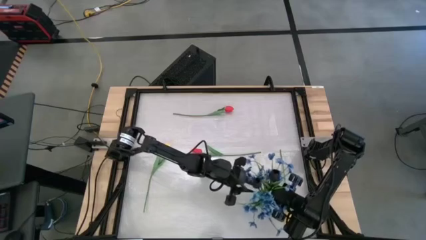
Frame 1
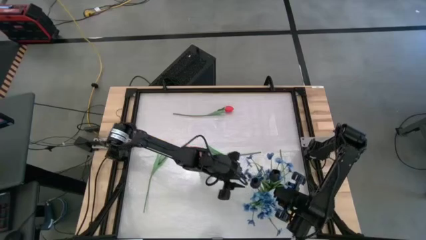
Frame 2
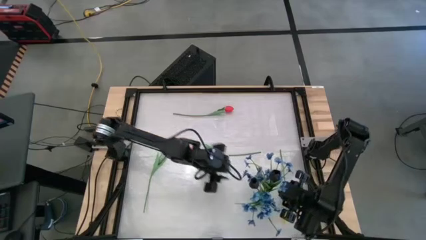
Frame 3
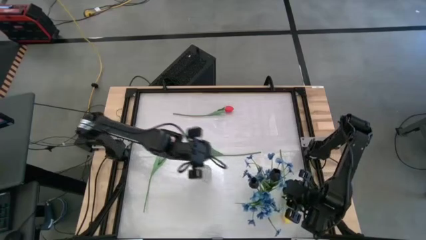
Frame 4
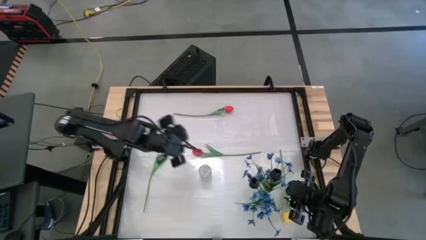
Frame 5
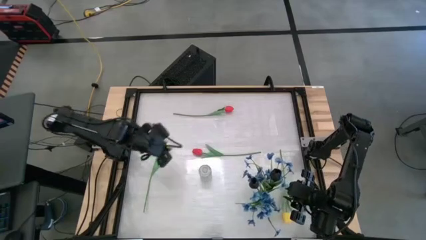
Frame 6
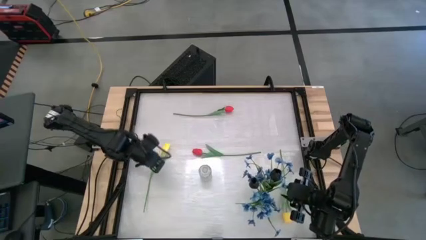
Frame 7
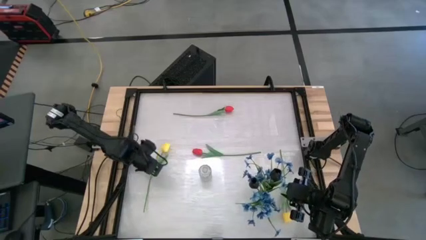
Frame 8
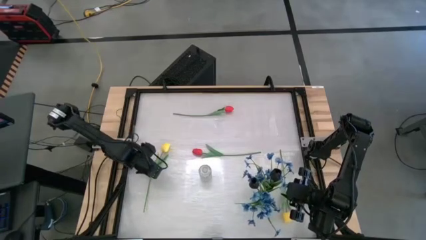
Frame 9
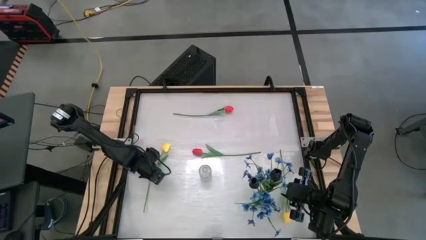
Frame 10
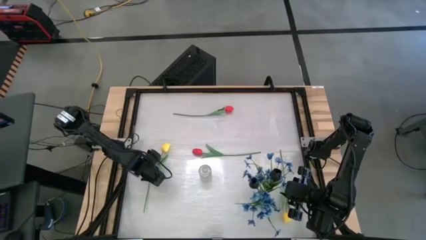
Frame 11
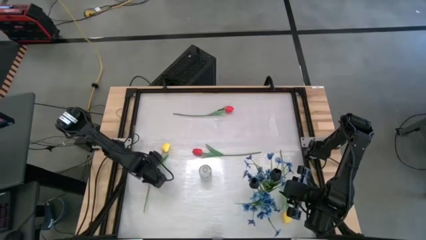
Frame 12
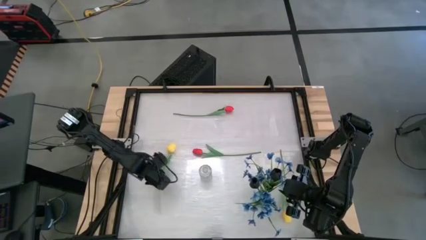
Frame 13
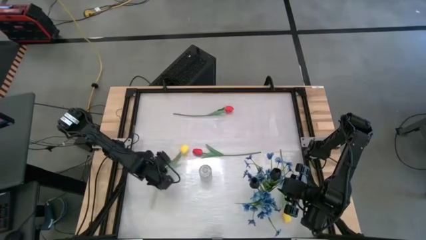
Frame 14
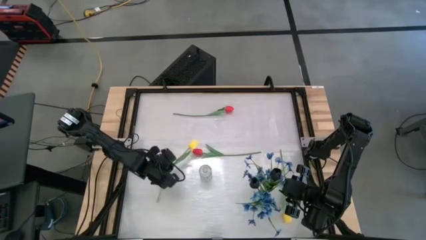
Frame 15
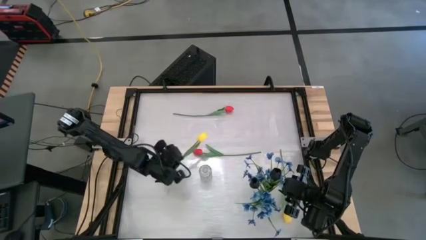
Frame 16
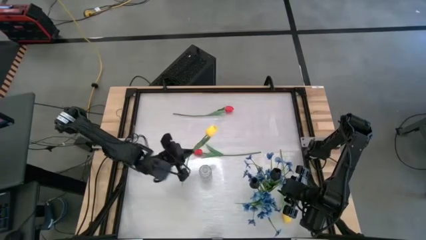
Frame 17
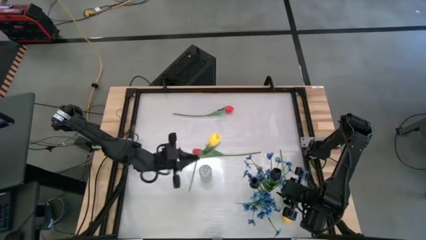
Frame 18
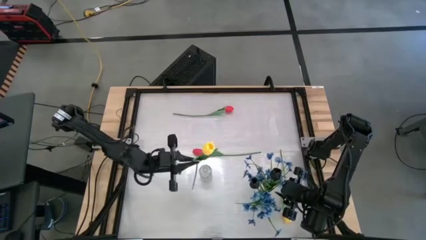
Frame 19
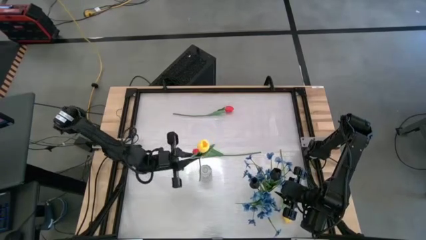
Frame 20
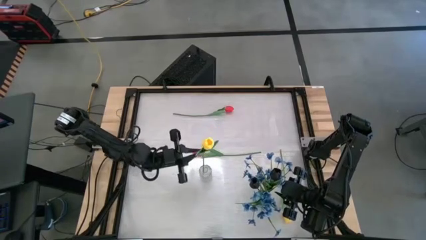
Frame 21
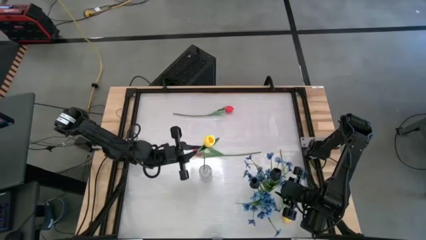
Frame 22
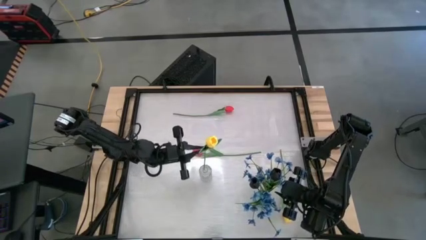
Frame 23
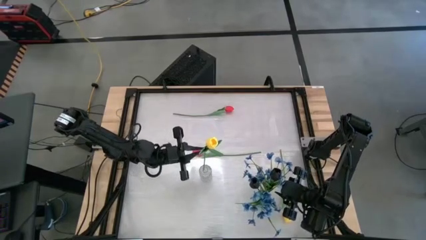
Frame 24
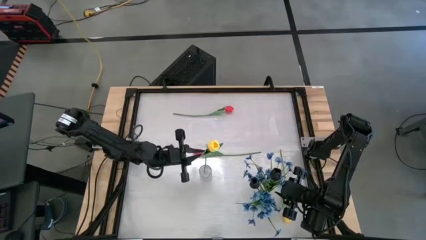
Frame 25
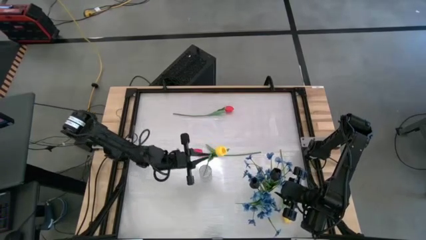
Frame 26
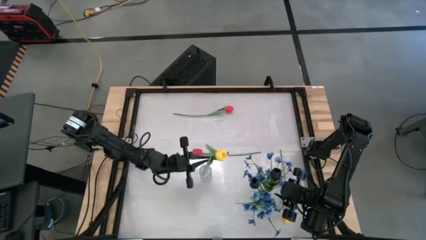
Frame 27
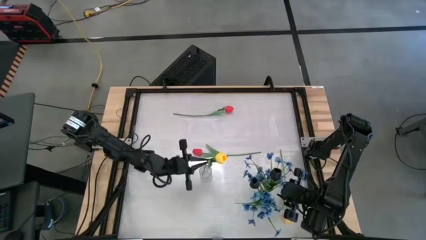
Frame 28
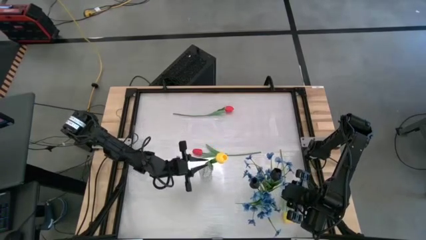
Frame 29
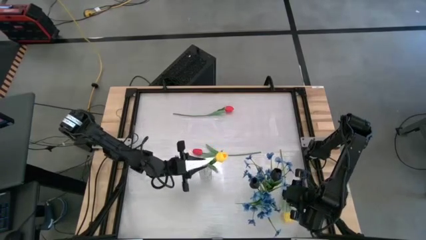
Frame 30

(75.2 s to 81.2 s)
Task: Sort flowers into vase by color
Put the left yellow flower into transparent vase

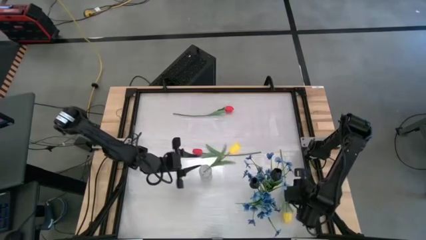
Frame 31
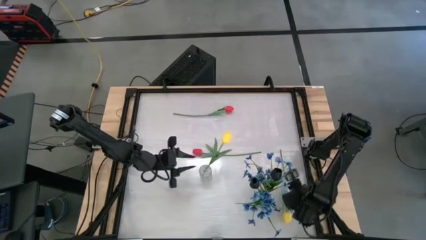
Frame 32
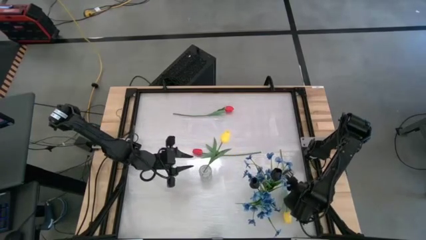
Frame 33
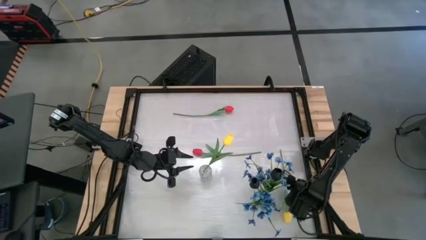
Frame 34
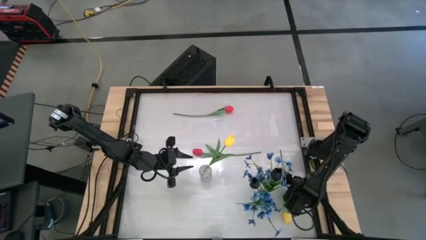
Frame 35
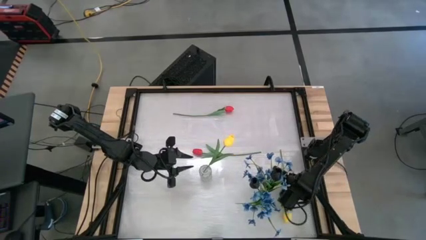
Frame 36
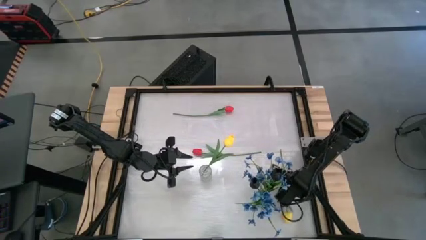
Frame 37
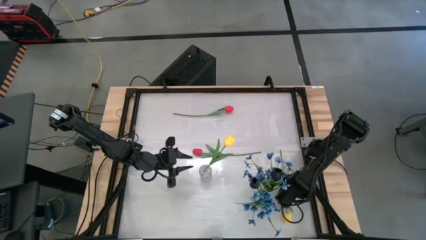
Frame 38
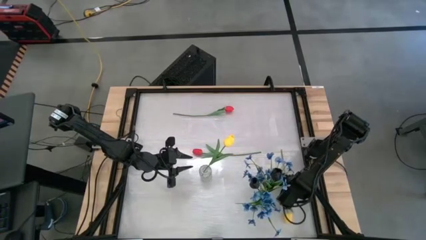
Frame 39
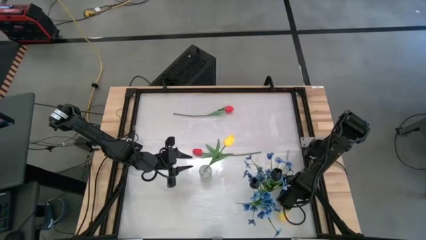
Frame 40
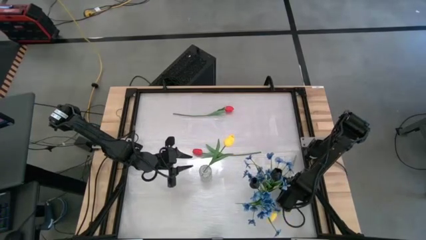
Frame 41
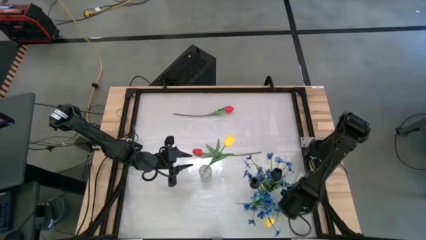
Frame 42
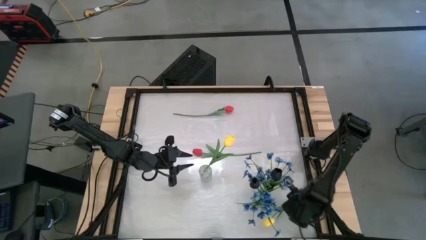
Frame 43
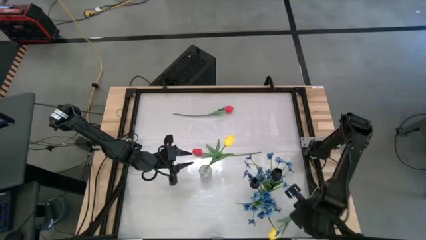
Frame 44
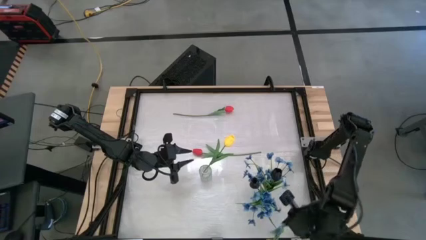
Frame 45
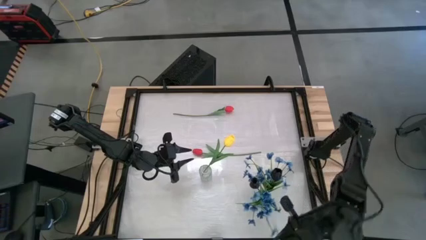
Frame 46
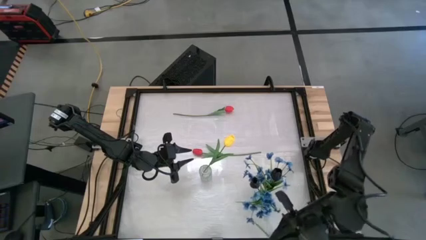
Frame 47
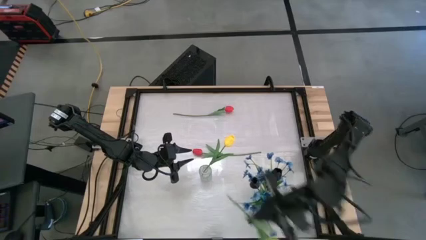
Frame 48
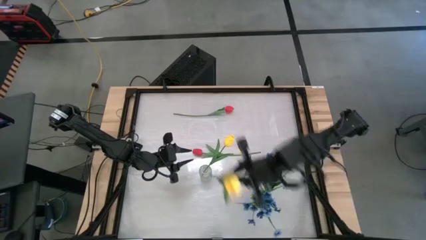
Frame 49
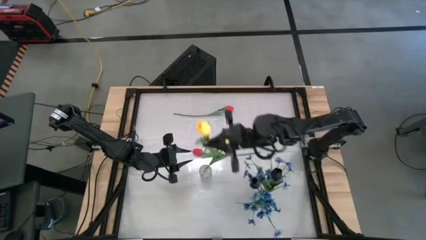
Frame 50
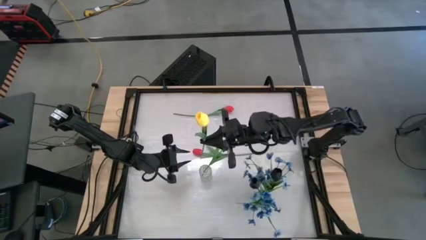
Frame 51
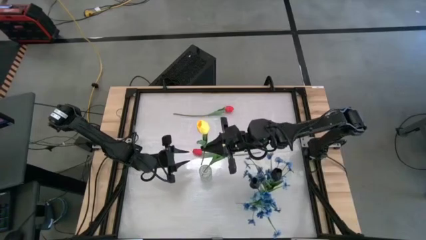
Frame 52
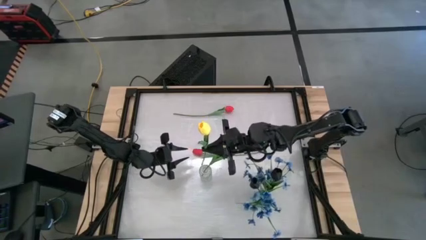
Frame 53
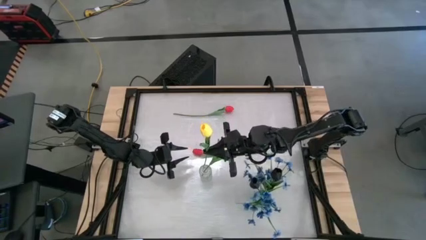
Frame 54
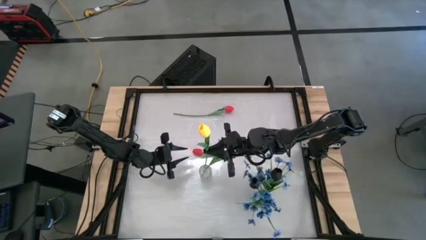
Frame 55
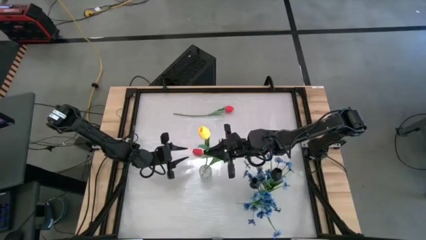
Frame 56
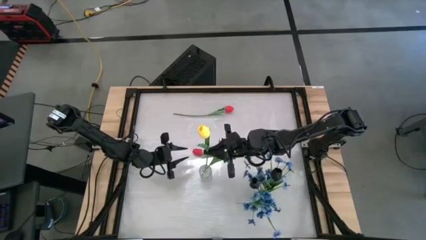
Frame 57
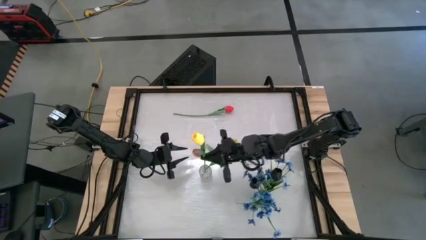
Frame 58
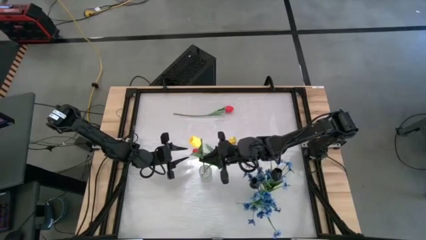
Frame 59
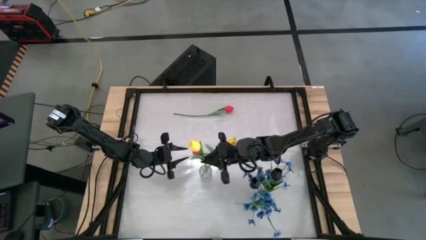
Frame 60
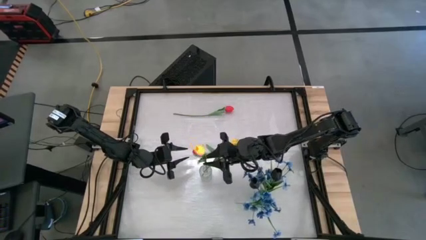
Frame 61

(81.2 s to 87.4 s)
Put the yellow flower into the transparent vase
